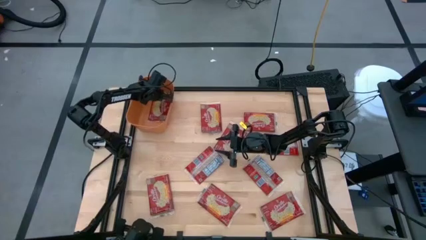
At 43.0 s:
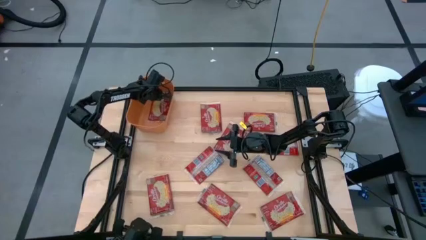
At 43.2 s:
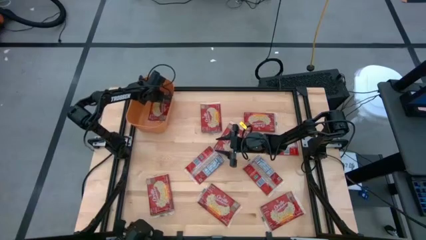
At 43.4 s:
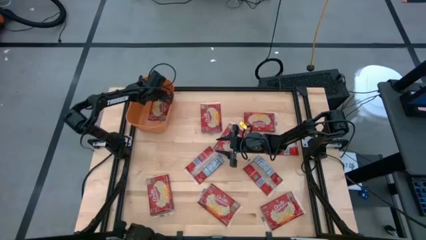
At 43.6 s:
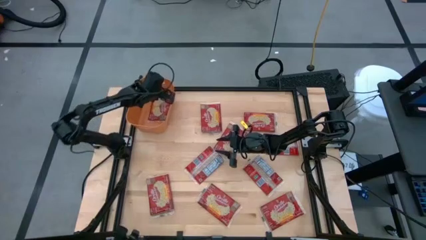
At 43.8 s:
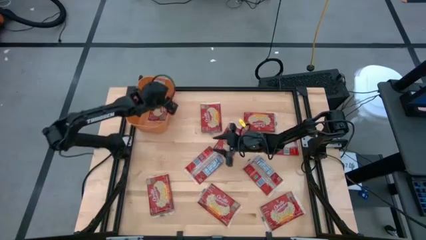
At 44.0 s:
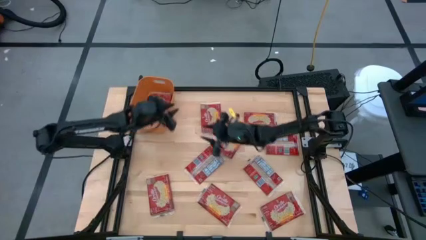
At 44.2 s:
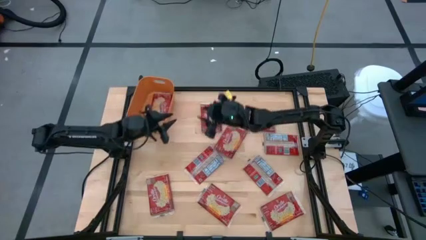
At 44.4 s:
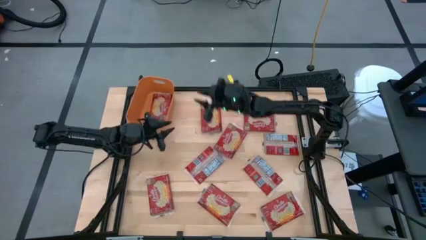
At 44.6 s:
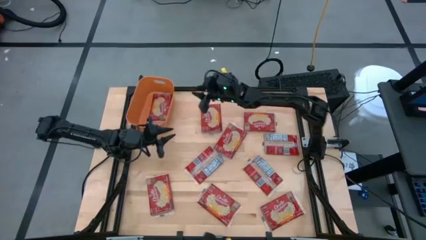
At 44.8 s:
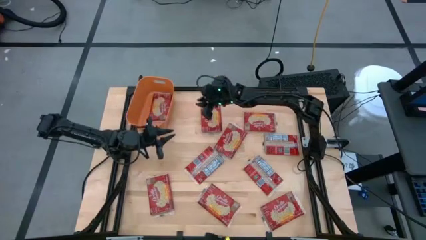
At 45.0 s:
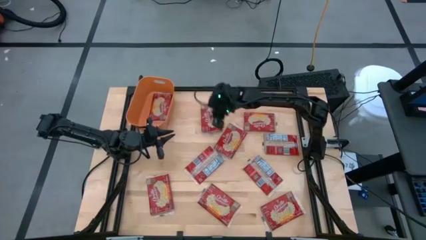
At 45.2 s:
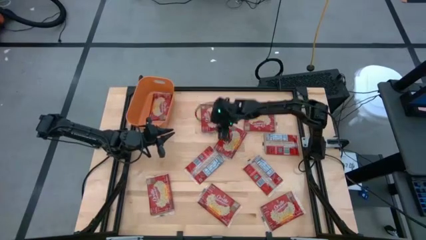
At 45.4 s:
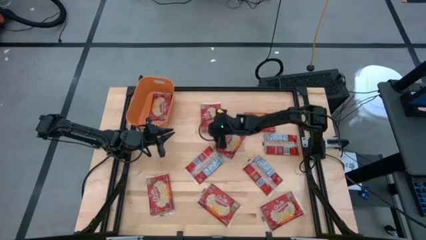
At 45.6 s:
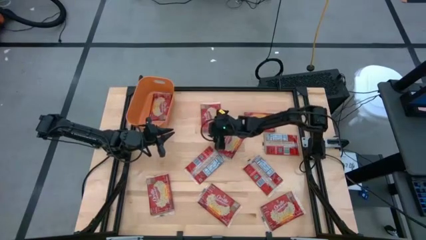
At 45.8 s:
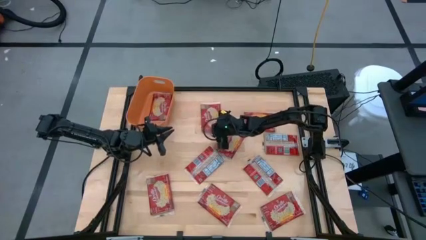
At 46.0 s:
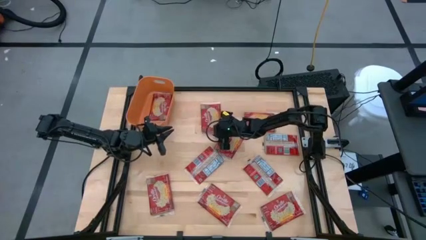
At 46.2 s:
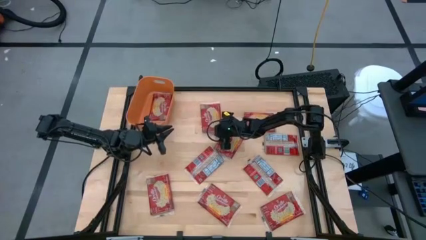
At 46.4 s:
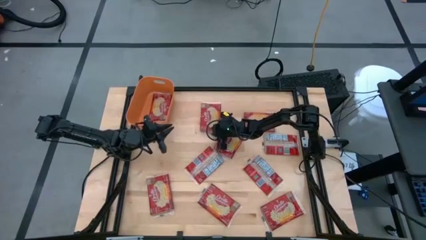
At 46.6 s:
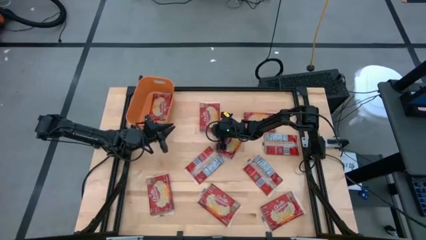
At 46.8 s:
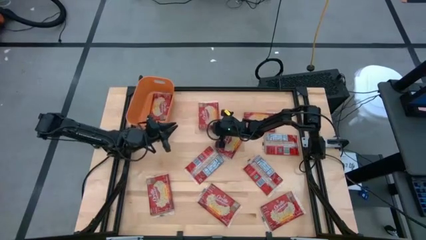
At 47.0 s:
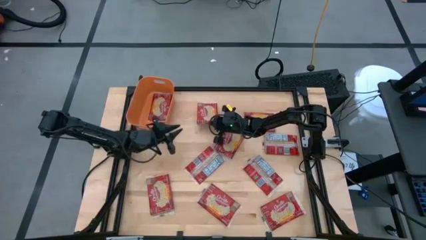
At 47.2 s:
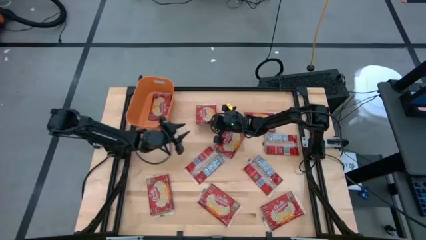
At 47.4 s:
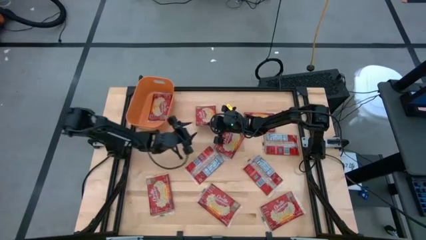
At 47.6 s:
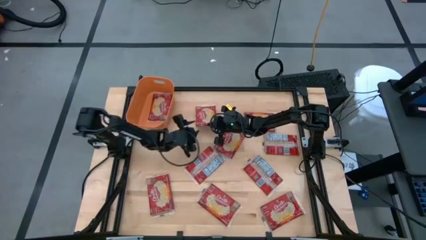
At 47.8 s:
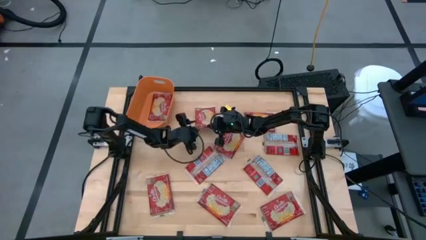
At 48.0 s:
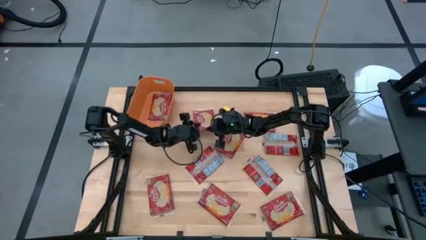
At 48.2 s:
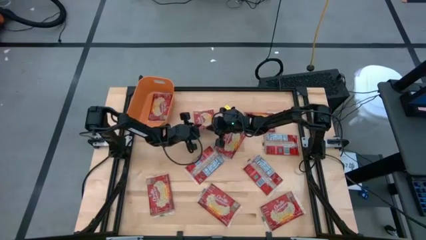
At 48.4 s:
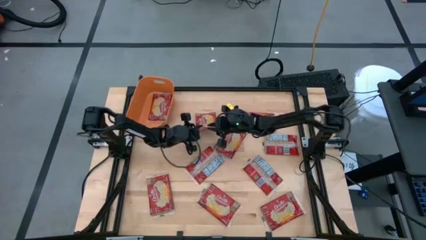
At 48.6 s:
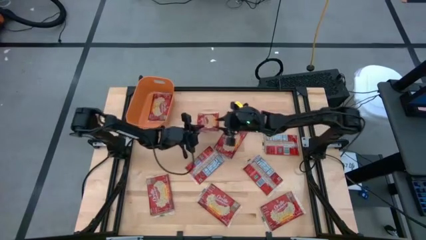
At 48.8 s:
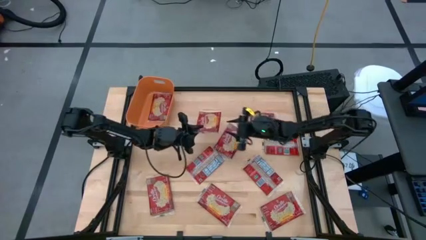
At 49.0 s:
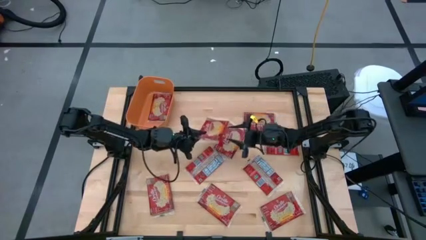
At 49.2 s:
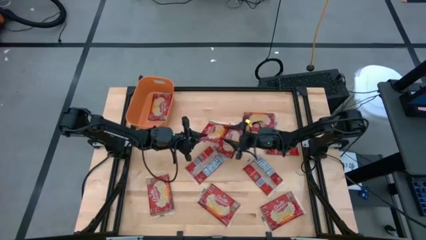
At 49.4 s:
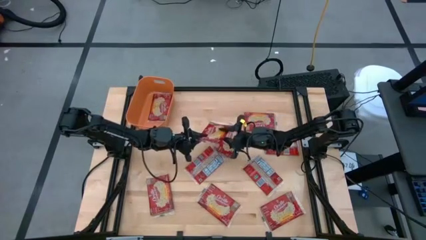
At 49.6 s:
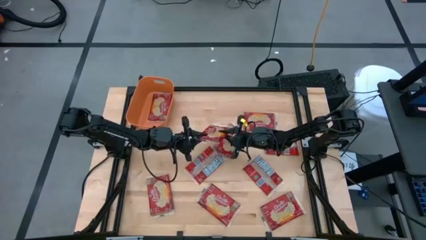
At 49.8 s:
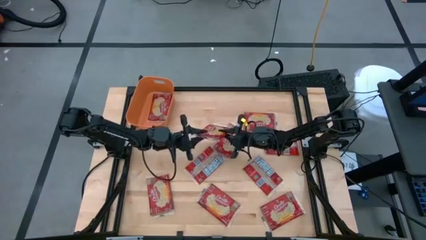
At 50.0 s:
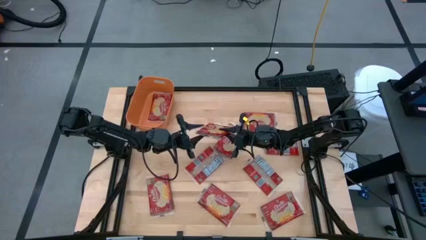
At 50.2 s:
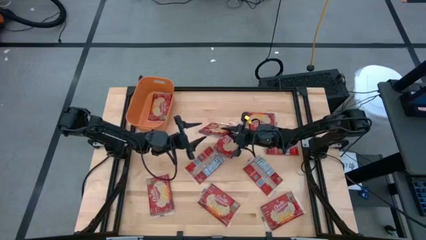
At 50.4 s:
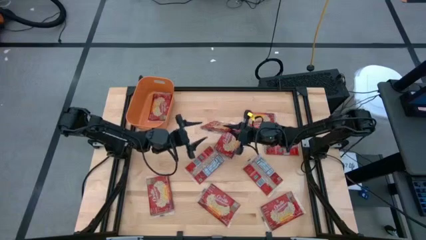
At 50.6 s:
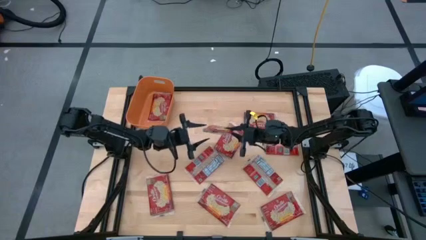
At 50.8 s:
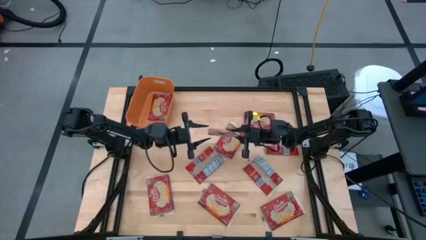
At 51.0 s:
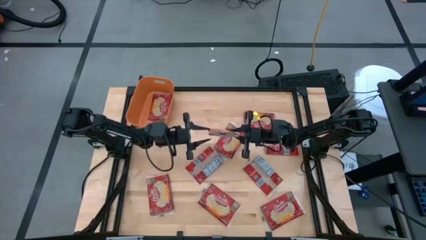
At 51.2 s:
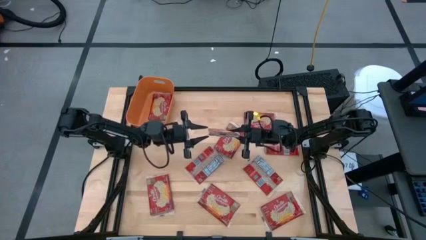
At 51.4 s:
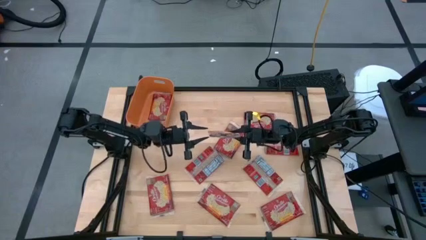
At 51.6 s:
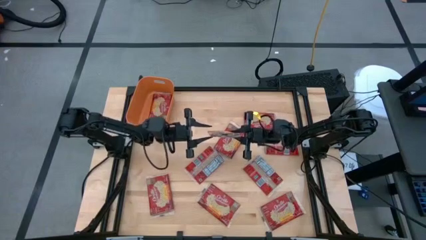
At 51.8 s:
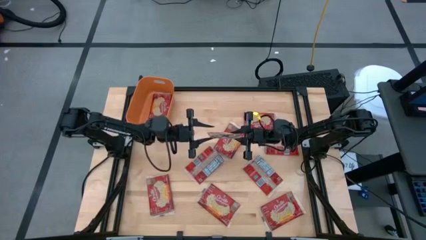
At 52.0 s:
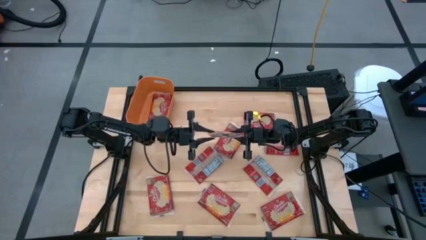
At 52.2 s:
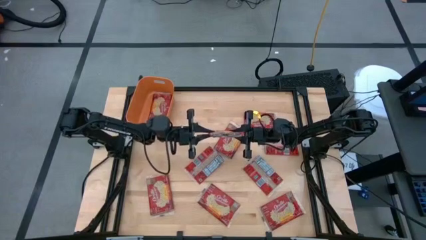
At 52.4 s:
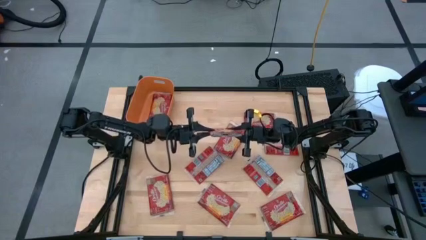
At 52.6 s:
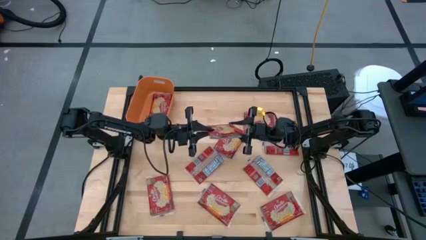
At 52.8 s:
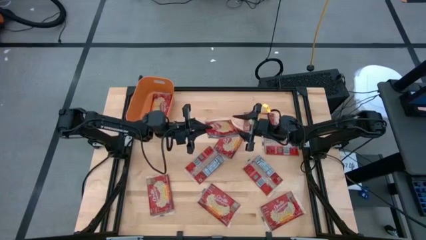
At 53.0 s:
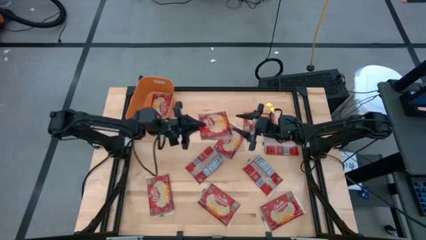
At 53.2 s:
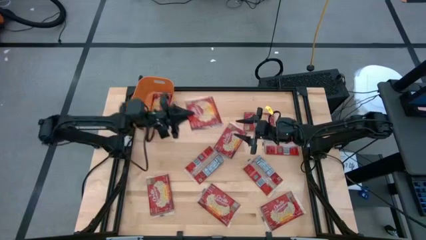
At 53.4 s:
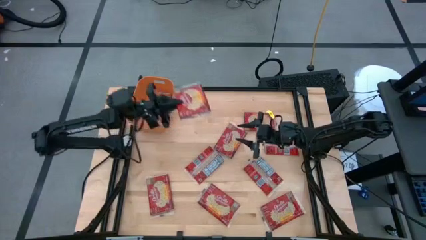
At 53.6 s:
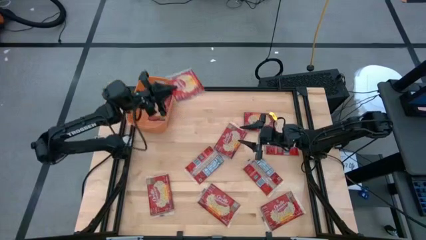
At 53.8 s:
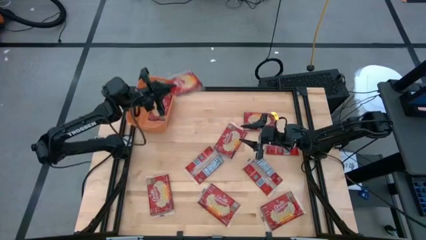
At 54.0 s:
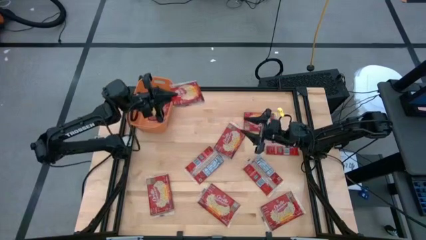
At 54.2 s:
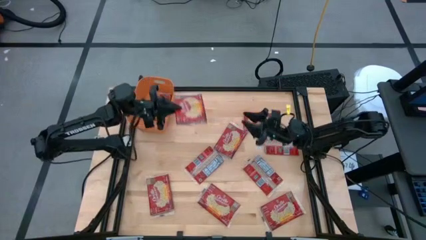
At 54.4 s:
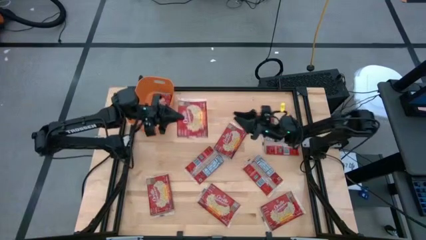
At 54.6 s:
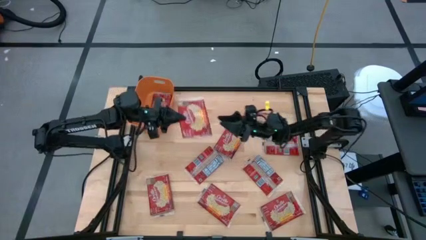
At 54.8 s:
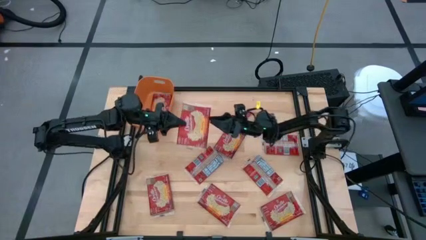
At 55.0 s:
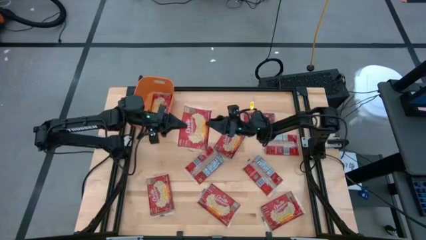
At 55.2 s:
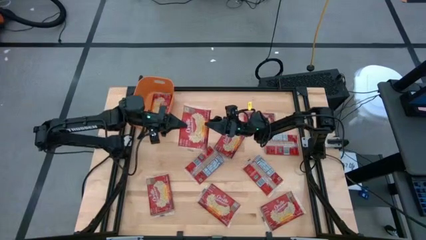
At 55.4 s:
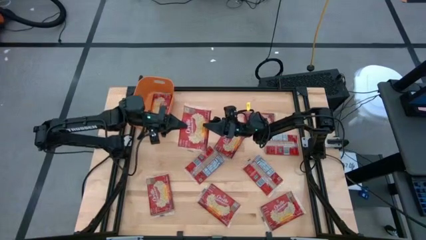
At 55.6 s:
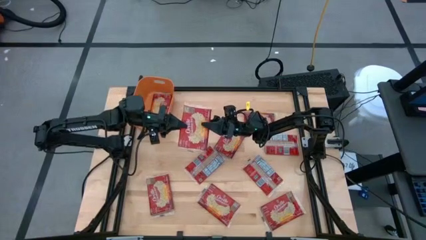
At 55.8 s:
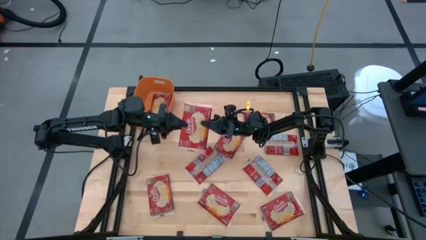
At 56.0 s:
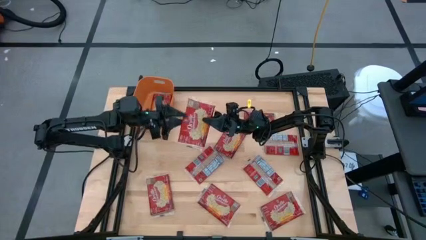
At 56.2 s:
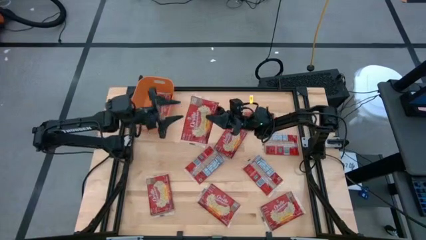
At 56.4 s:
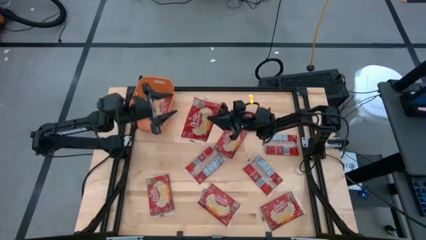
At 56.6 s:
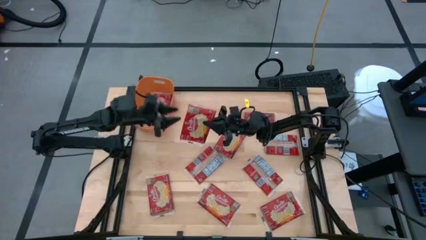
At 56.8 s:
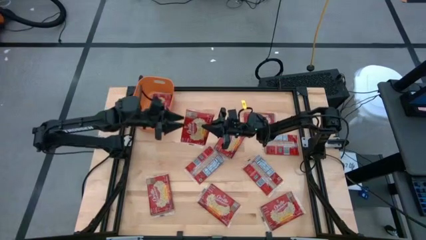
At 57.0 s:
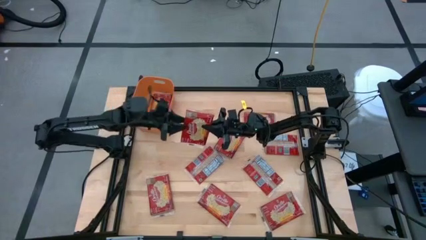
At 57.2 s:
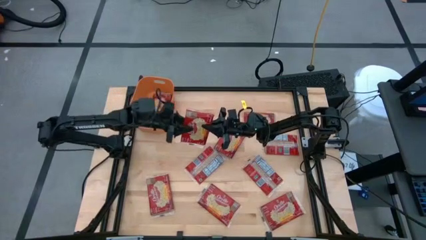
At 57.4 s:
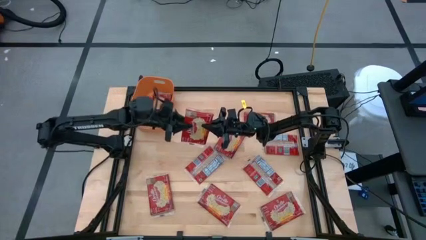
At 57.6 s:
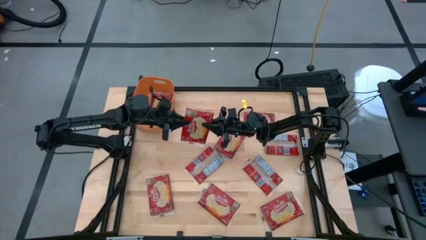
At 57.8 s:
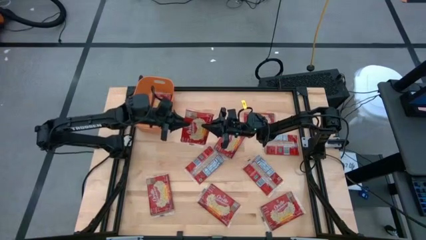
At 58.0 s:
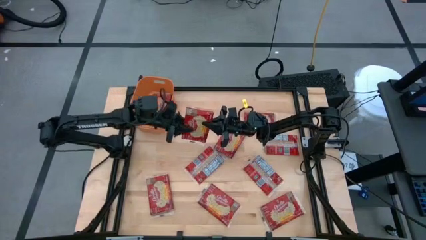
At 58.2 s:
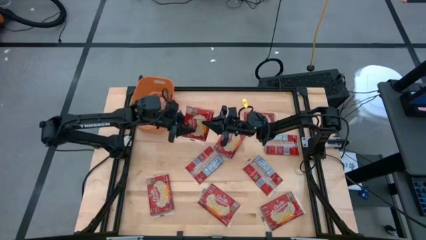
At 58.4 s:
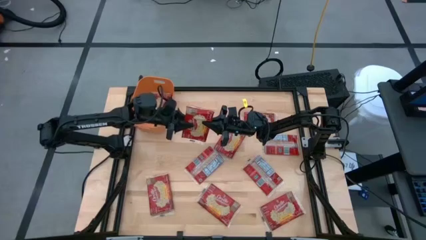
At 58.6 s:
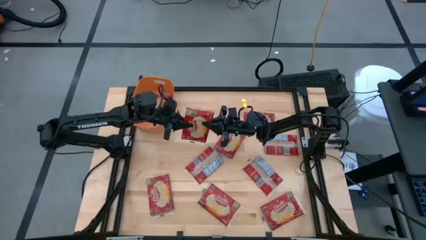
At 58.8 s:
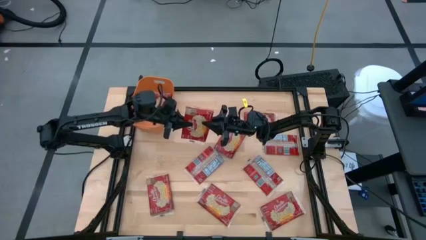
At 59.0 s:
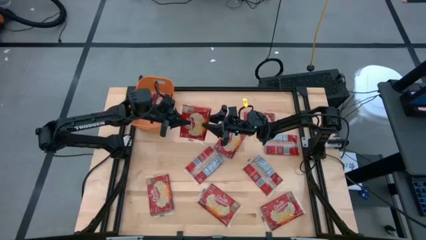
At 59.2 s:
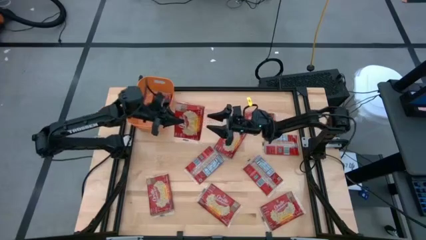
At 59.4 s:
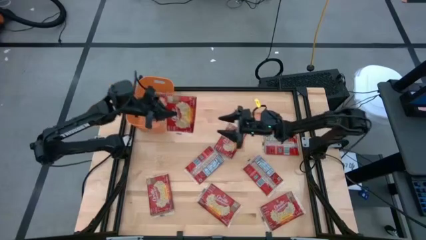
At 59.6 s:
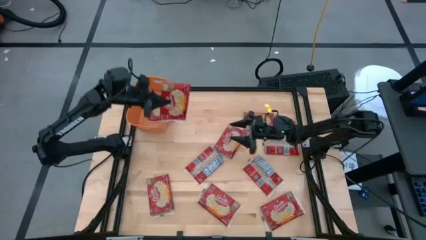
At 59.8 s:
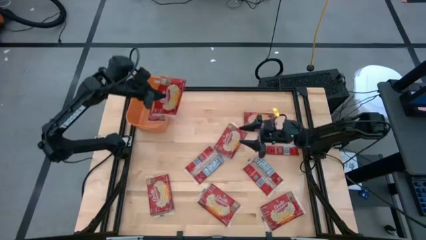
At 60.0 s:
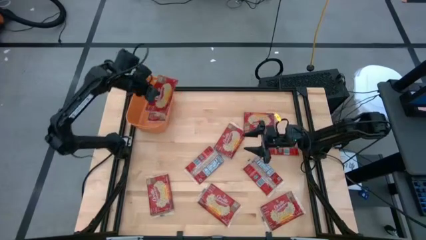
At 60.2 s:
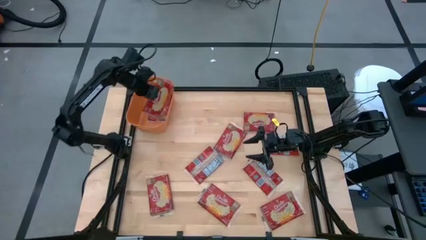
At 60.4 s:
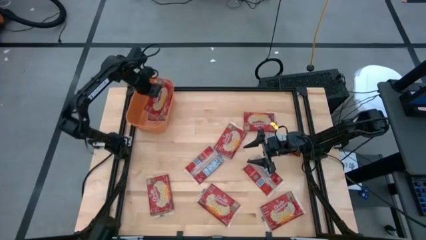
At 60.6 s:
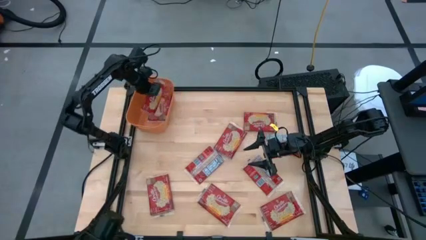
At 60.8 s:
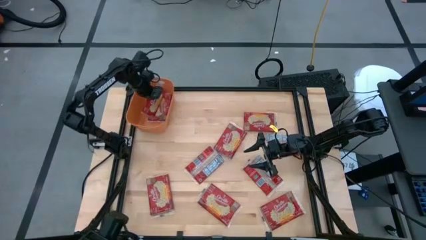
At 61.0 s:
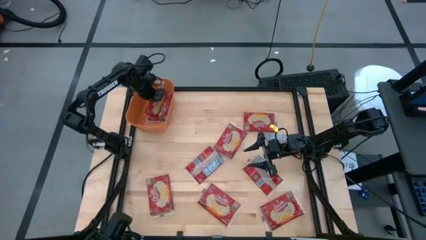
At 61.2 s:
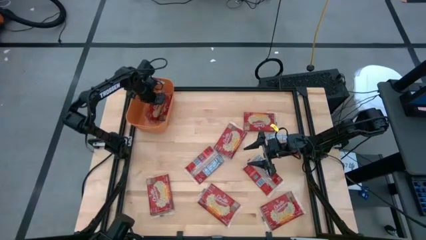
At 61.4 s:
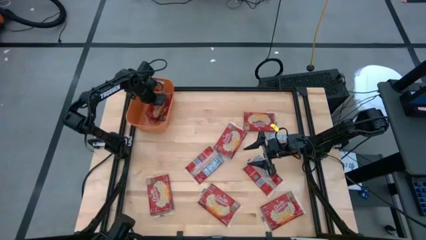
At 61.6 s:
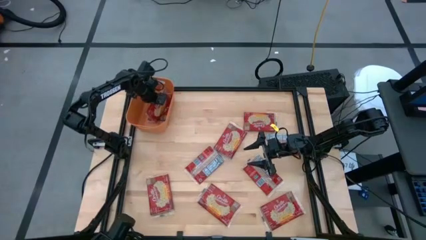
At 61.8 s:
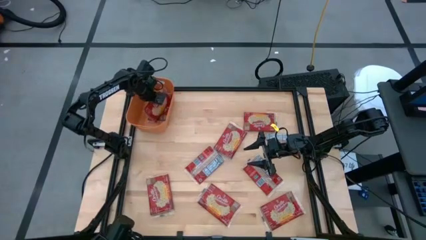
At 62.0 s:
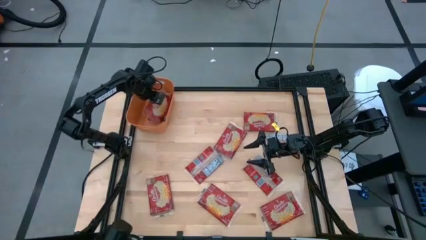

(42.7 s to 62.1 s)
Task: Sort popcorn bags into baskets
Put the red popcorn bag into the orange bin
